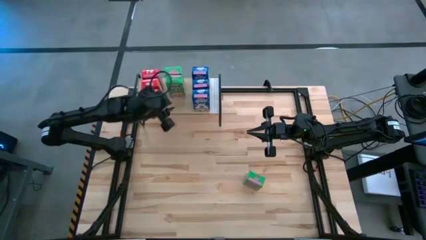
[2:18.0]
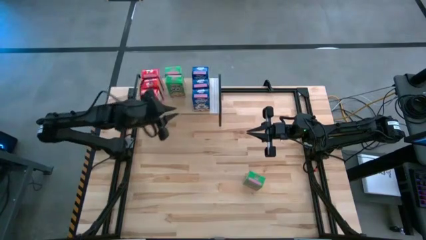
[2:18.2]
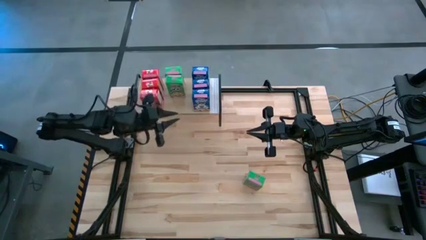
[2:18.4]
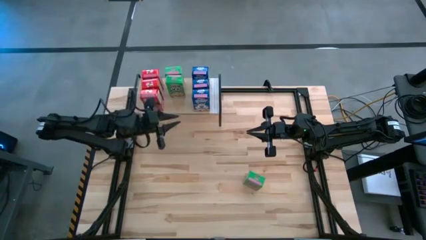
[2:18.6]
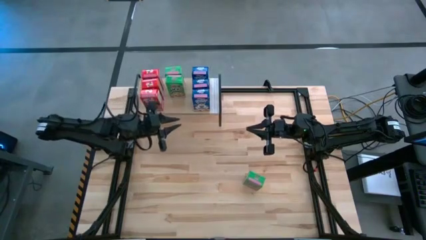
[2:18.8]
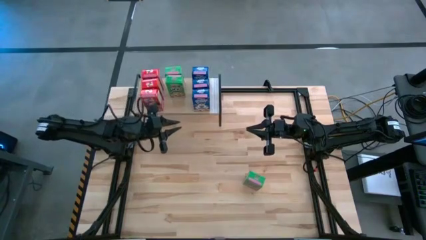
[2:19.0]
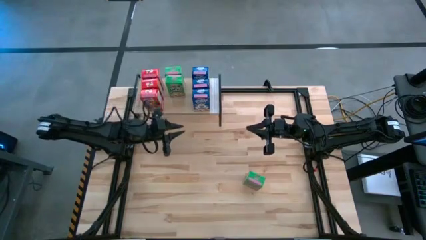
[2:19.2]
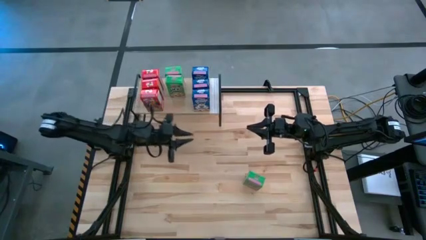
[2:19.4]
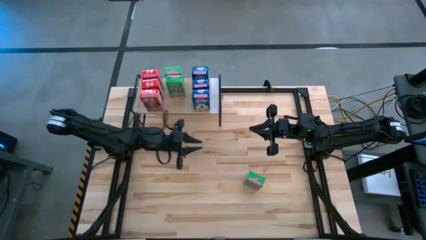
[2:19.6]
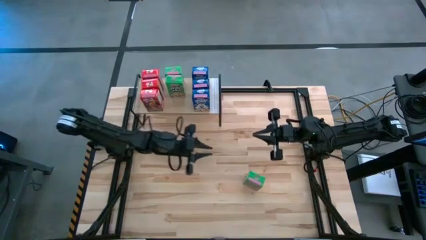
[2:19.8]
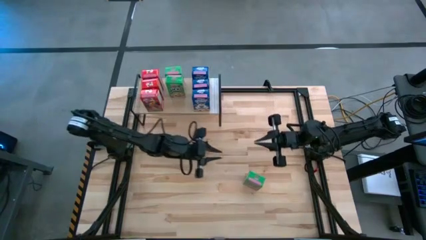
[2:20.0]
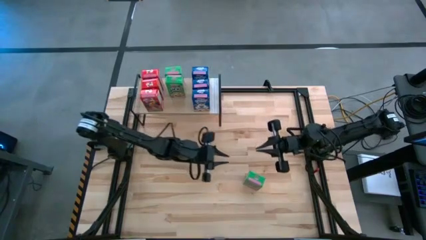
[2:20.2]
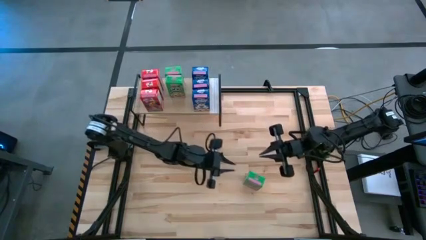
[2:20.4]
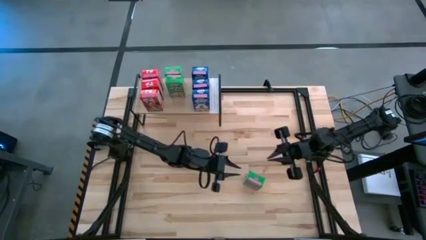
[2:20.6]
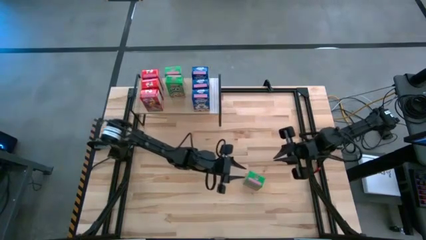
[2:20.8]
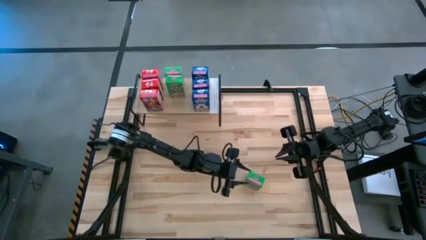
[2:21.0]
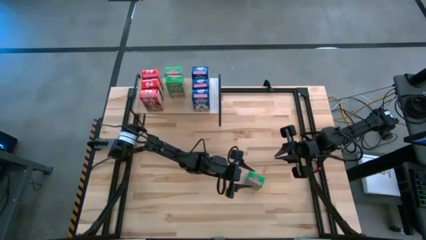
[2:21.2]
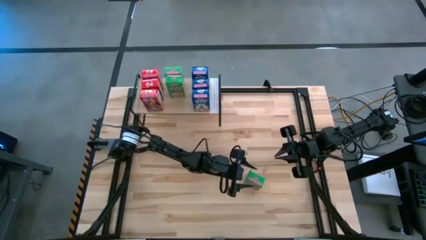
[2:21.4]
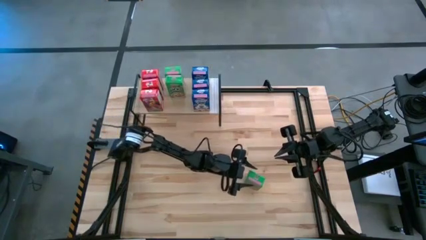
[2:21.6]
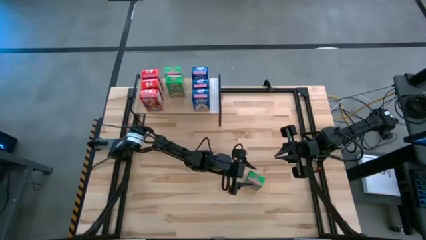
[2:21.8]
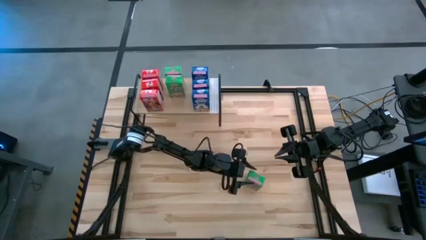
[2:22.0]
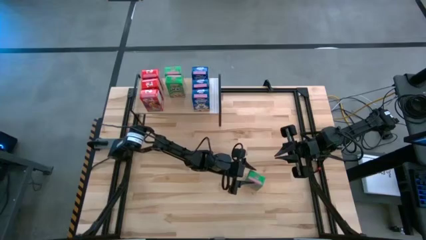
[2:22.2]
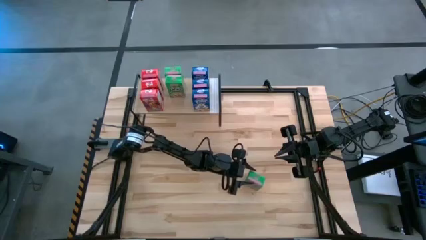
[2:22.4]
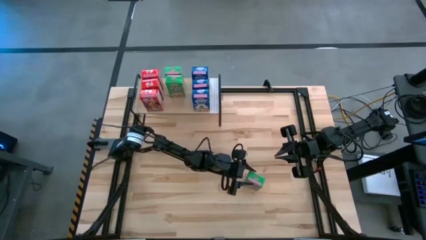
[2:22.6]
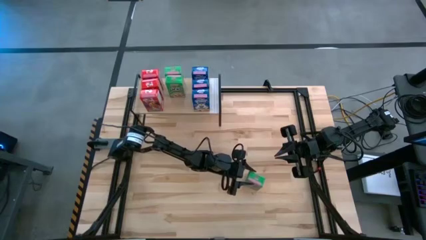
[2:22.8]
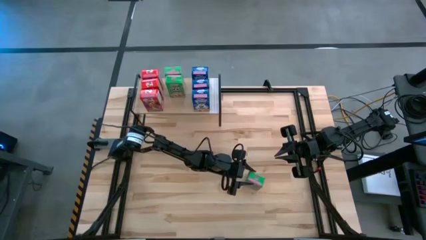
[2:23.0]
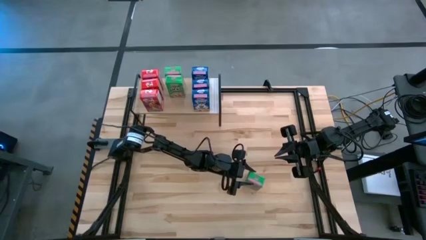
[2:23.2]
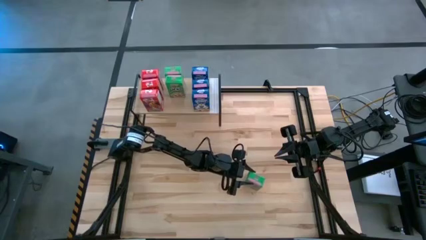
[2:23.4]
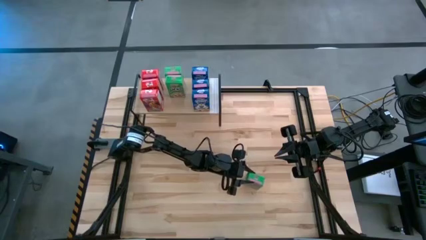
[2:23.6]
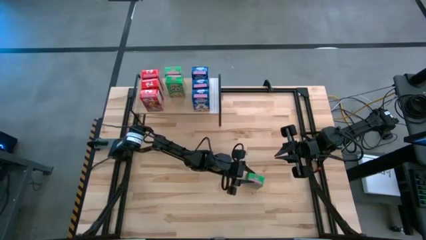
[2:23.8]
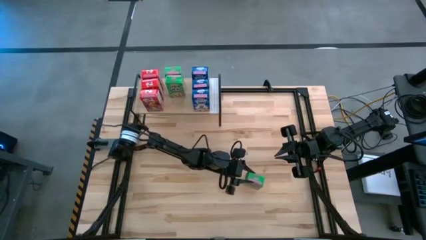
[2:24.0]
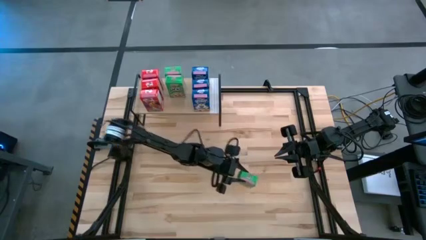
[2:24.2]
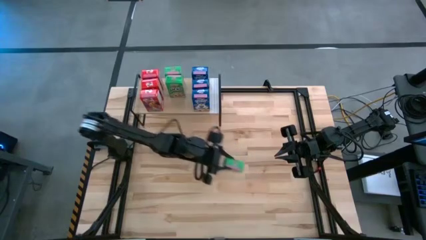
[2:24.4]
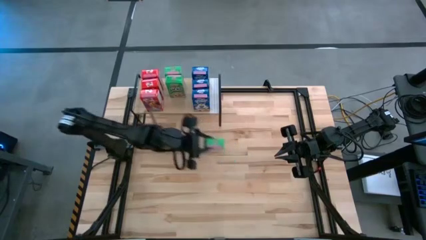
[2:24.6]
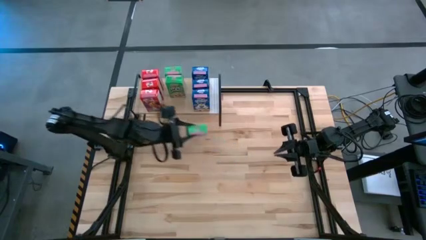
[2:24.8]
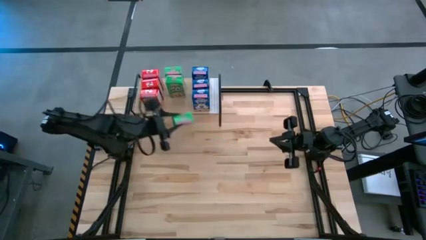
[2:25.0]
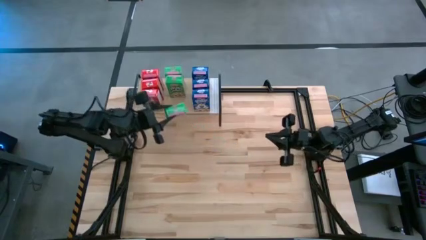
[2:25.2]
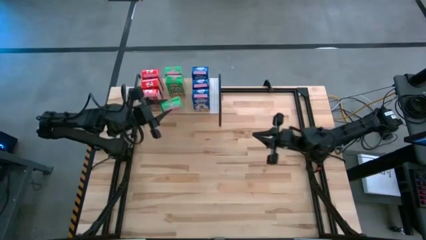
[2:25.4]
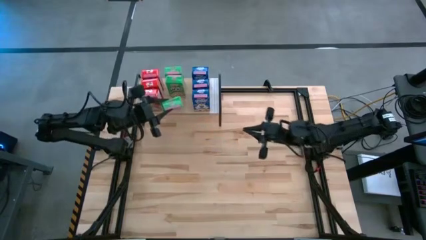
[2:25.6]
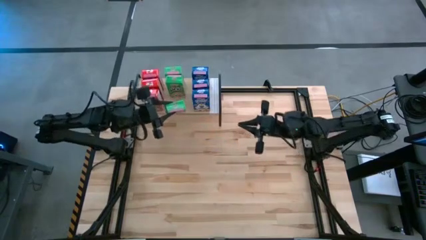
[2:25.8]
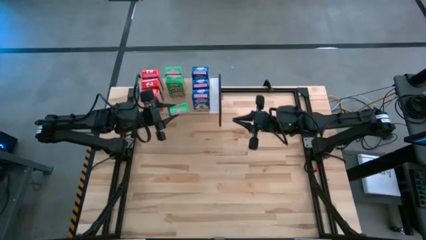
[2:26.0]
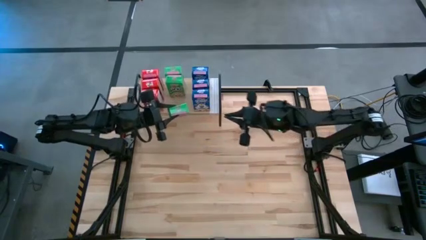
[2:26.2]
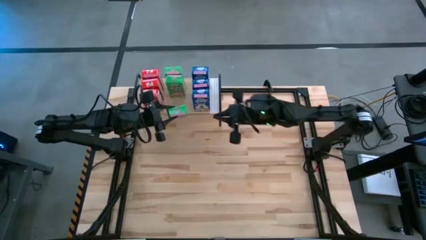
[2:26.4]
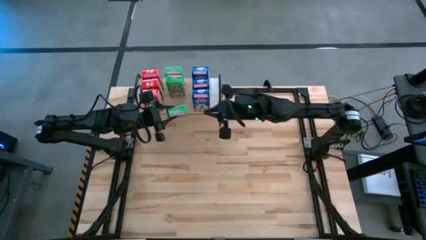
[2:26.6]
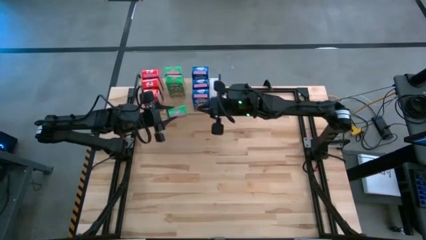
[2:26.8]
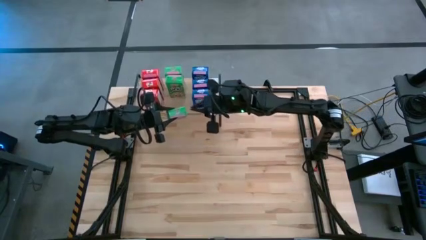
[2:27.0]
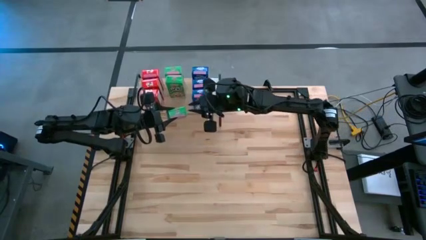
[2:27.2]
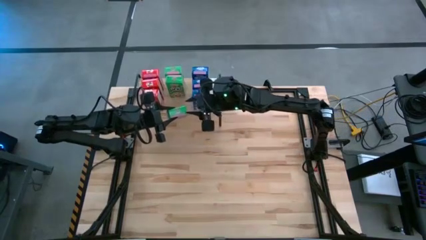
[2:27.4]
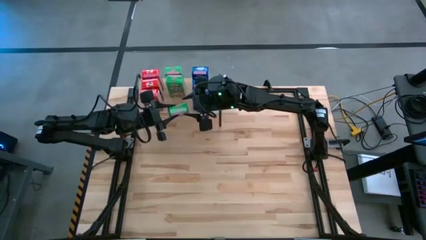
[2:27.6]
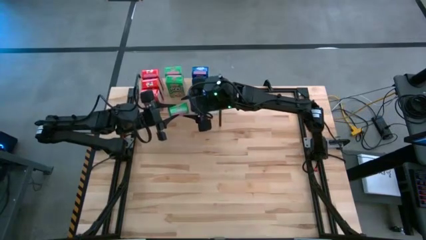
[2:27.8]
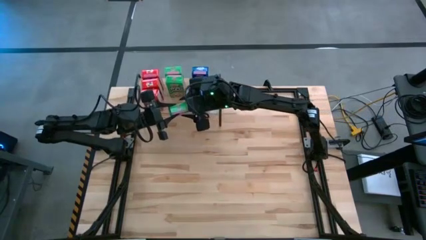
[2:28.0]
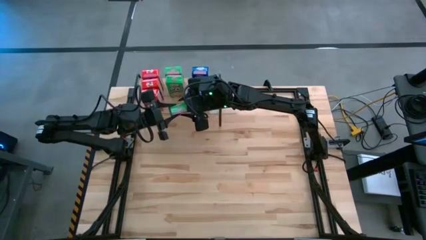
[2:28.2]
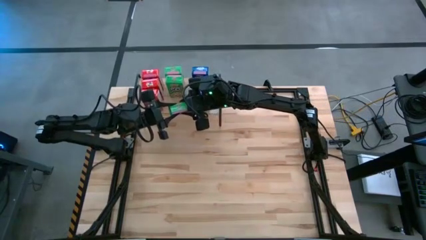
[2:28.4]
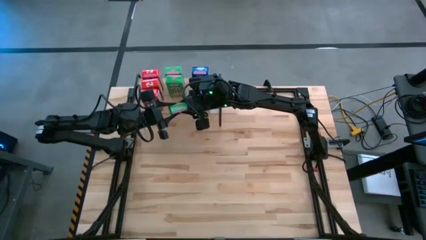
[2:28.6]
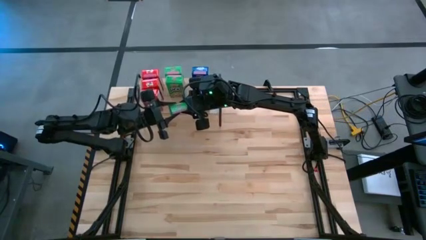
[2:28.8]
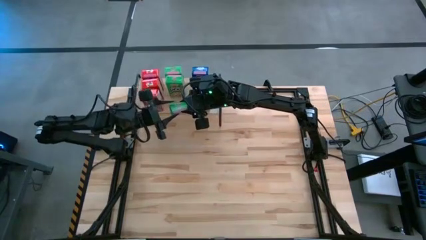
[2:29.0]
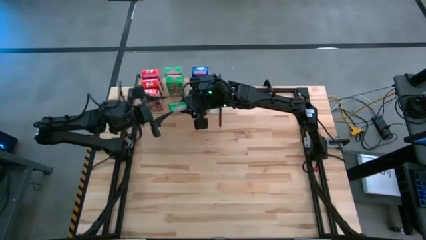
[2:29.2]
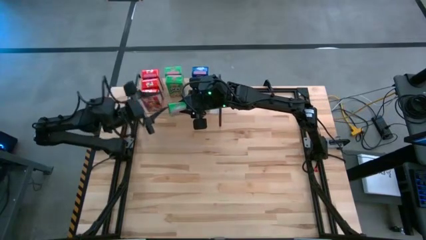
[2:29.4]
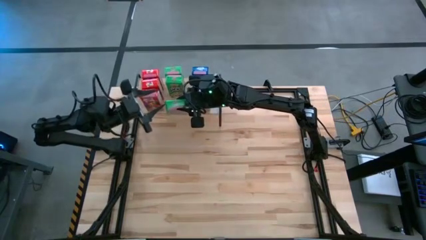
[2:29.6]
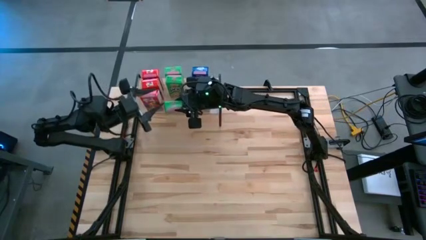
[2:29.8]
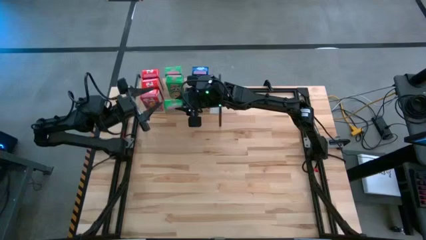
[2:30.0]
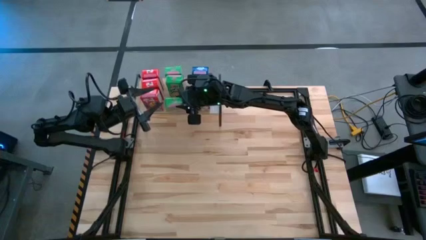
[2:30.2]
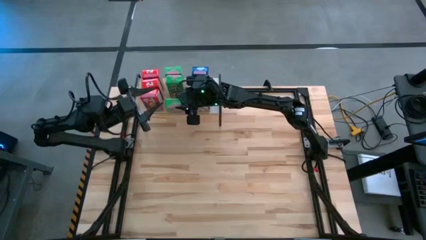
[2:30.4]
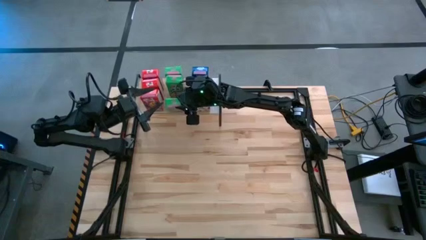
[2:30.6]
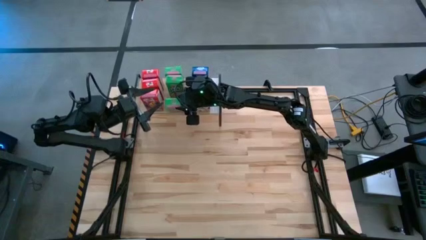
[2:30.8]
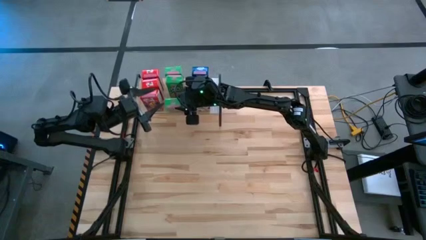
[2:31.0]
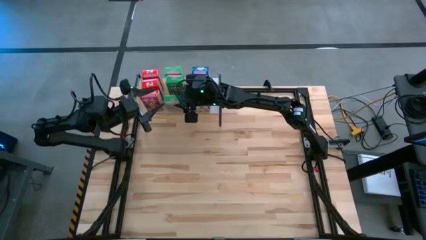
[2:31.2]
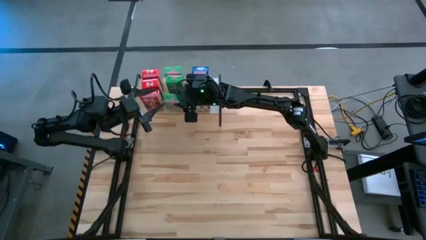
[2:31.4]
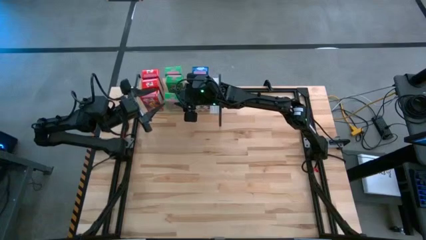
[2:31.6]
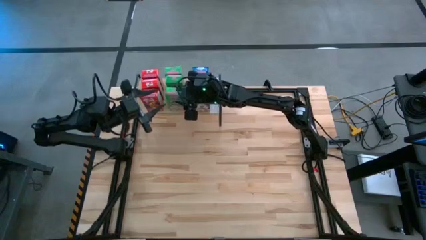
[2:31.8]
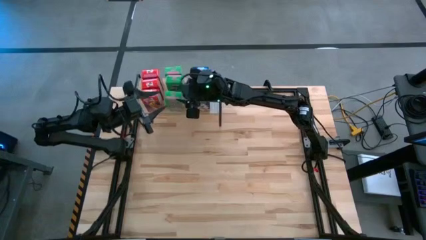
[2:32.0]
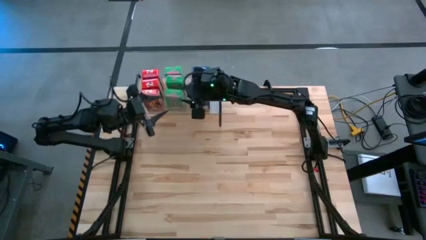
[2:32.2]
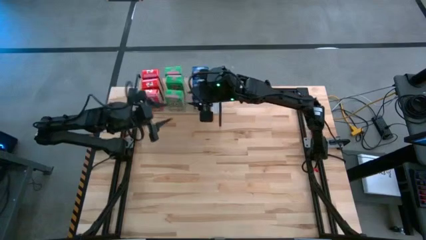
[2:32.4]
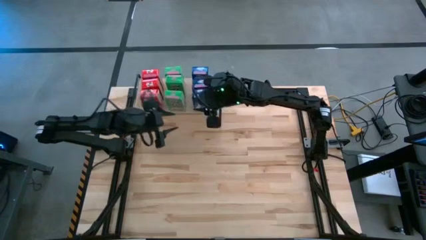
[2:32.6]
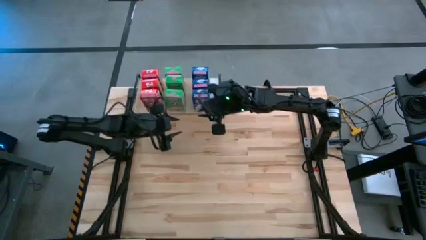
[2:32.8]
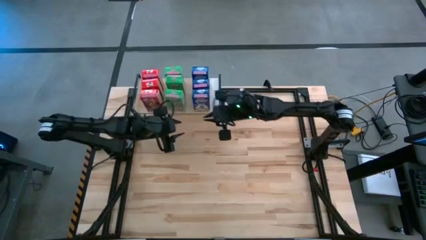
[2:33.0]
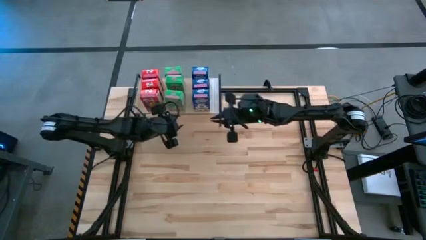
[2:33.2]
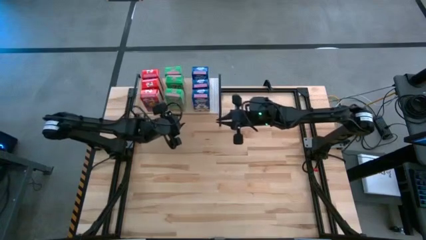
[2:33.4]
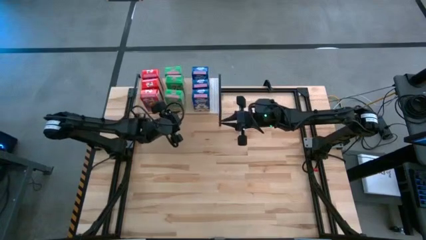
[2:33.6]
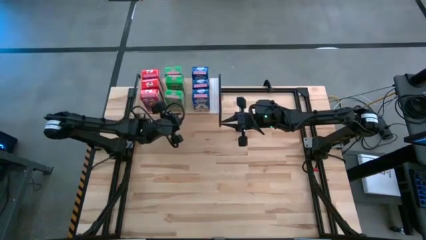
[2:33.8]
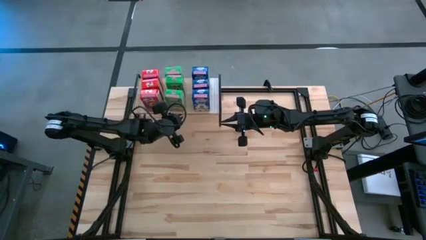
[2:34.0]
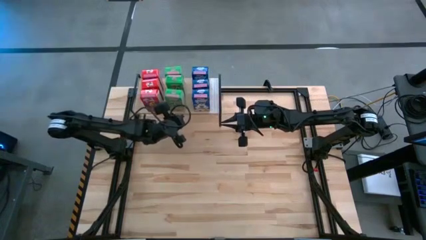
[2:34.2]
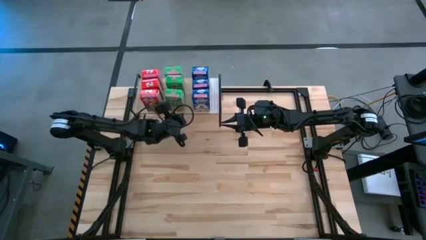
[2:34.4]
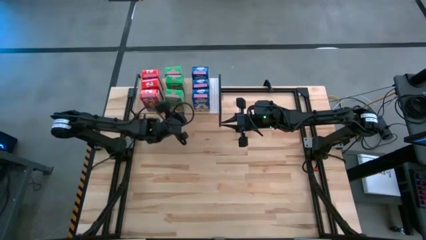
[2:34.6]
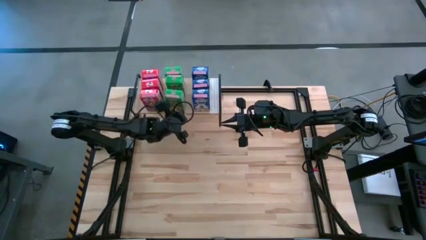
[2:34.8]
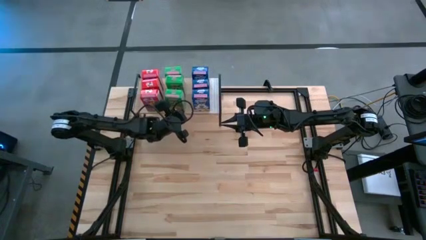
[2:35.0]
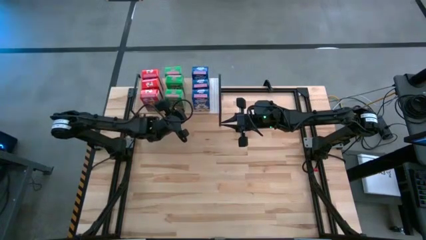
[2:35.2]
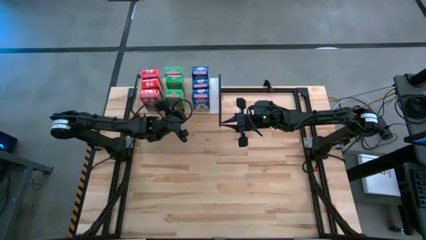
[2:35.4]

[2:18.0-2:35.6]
Task: Stack cereal on shelf
Put the green cereal box on the shelf aligned with the other green cereal boxes
